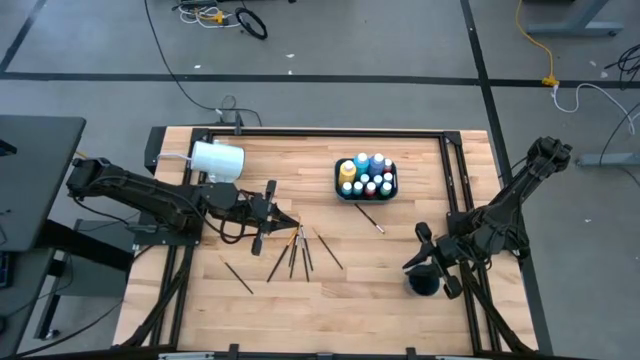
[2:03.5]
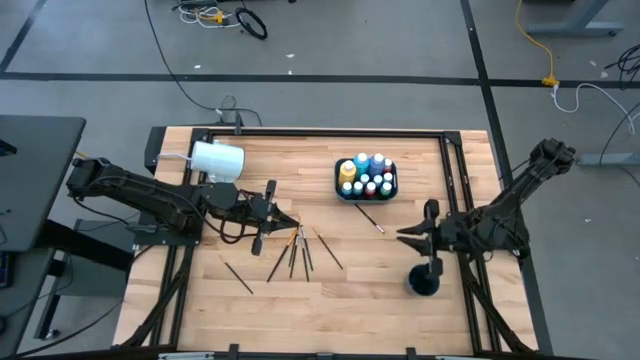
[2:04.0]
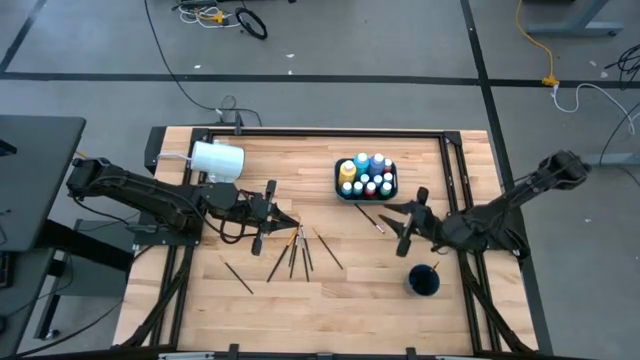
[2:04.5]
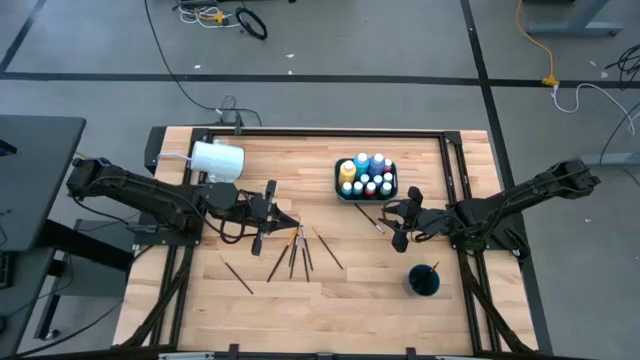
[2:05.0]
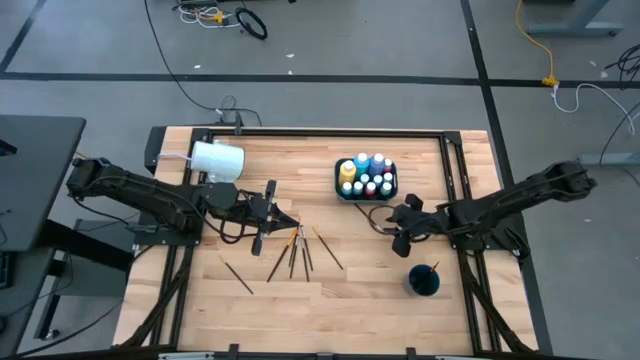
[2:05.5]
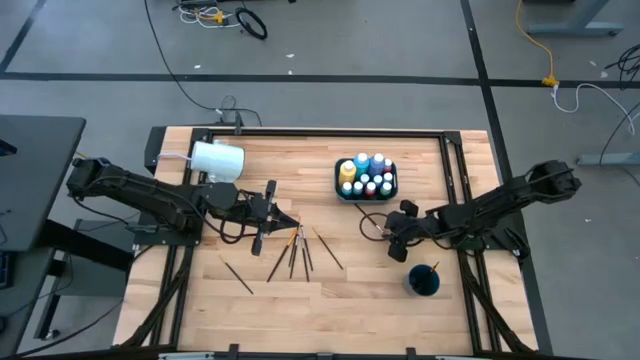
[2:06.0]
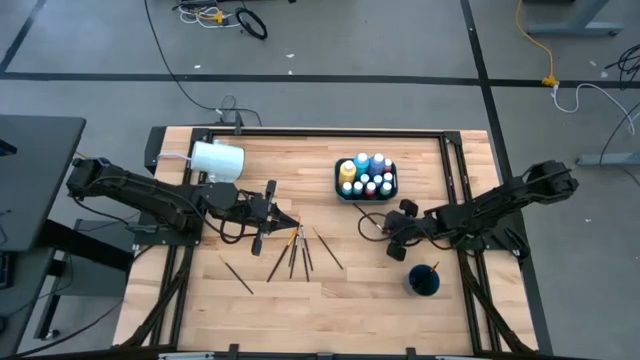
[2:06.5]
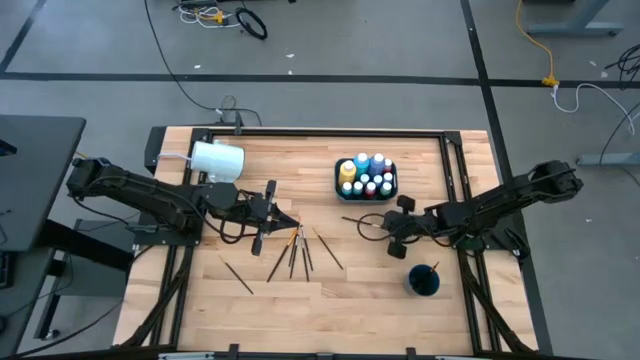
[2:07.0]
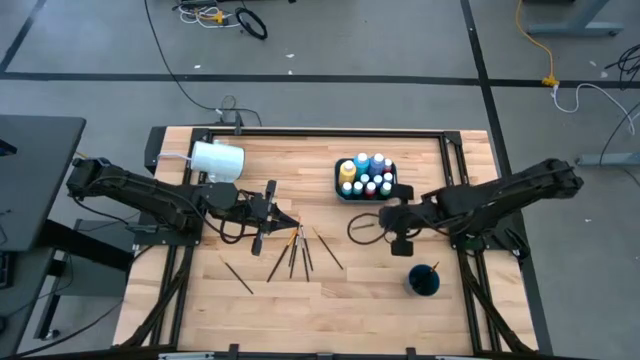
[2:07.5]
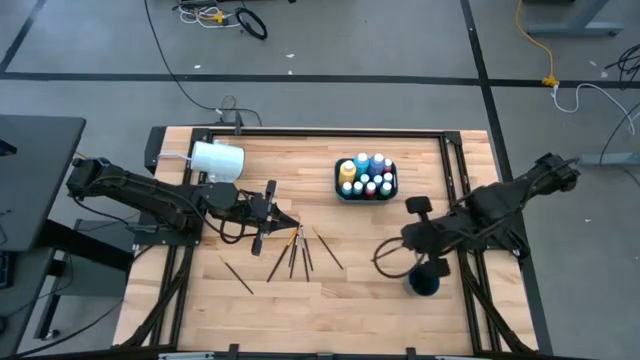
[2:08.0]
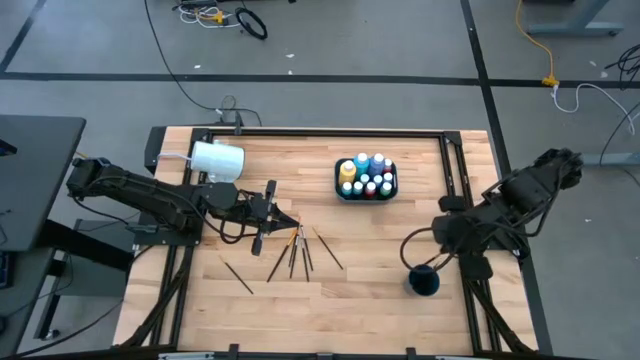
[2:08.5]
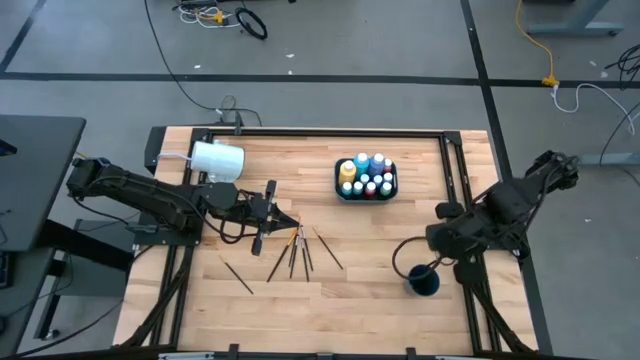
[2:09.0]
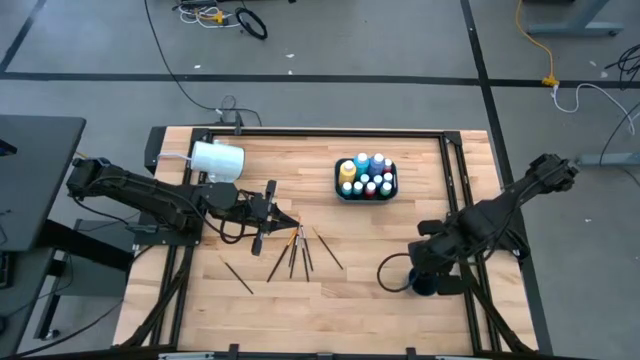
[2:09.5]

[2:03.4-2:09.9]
Task: Pick & Place Paint Supplies
Put the silver paint brush into the cup

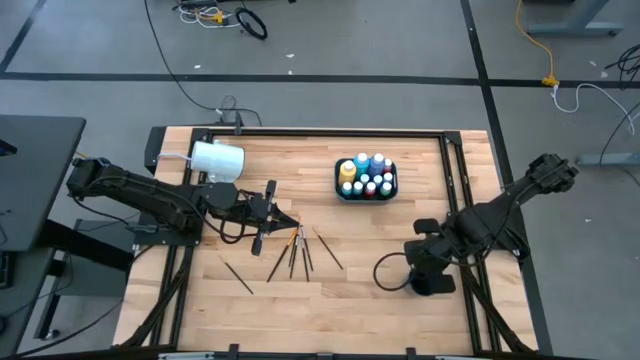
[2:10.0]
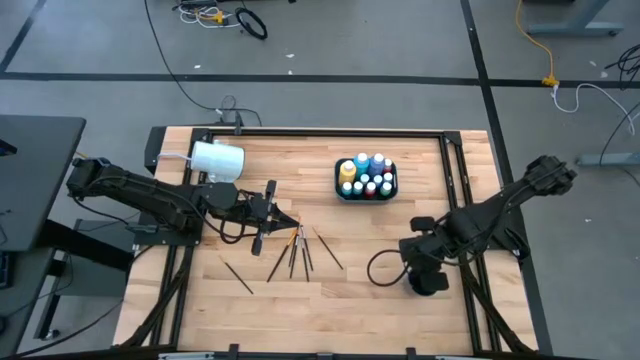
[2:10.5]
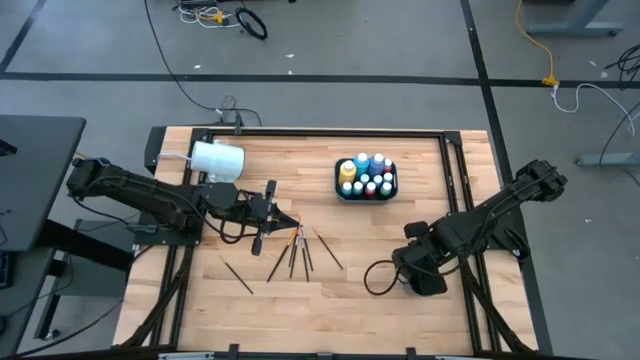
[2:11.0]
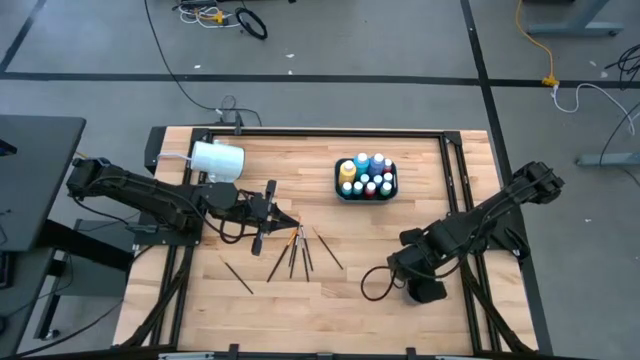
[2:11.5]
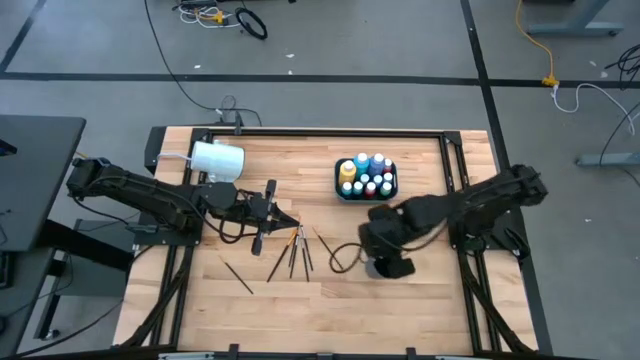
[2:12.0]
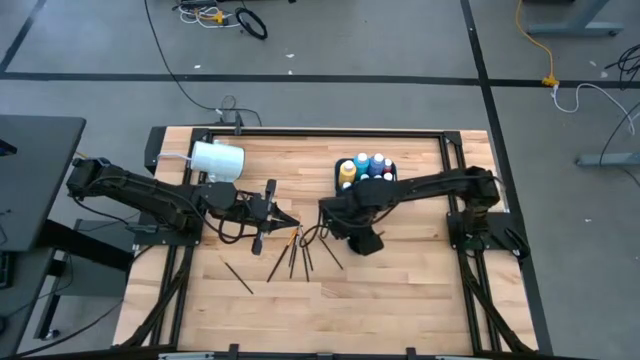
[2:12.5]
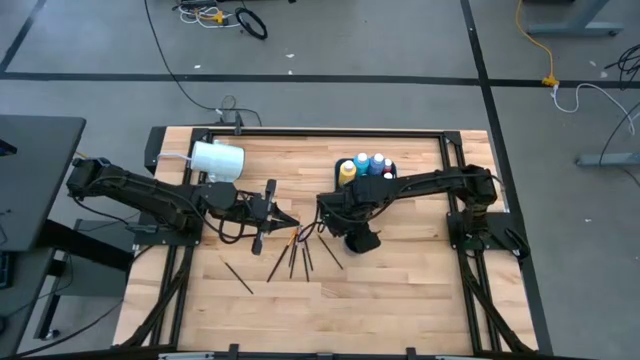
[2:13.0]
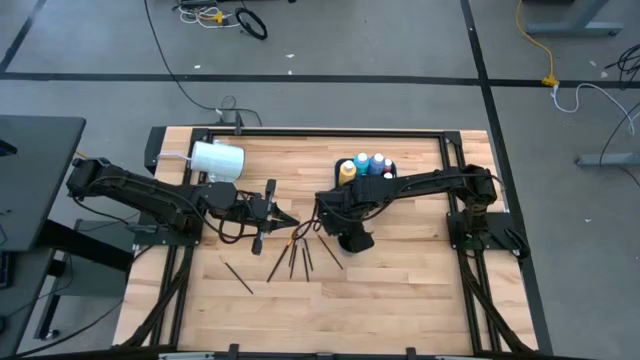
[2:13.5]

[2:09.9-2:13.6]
Move the cup to the center of the table

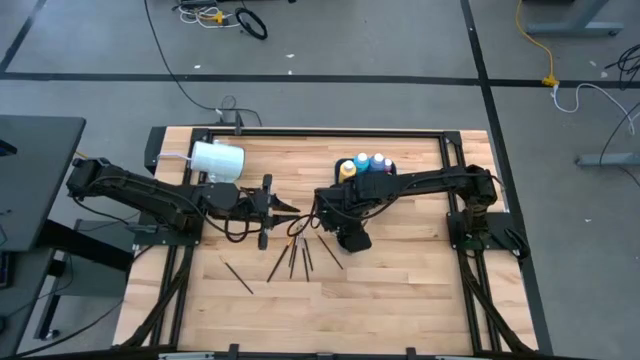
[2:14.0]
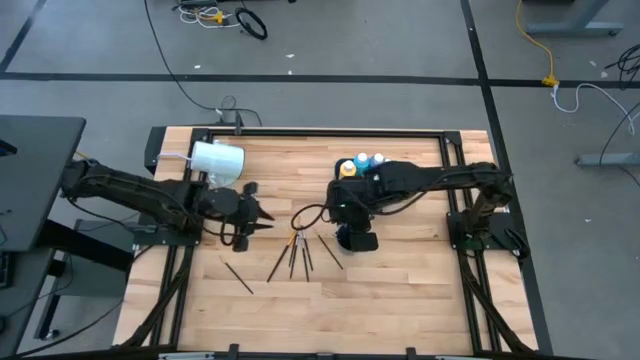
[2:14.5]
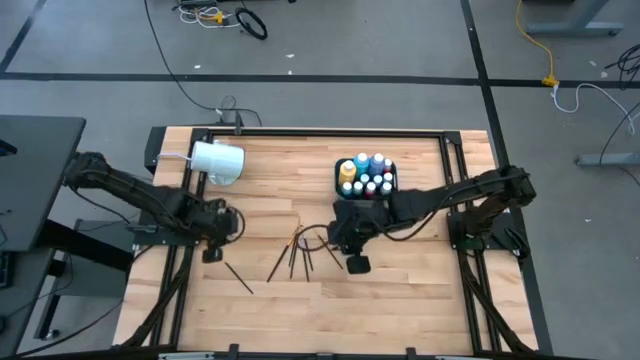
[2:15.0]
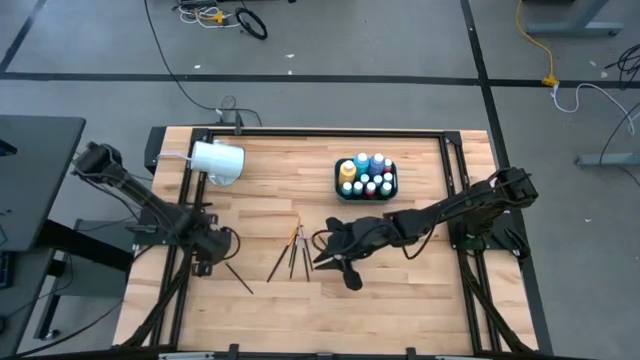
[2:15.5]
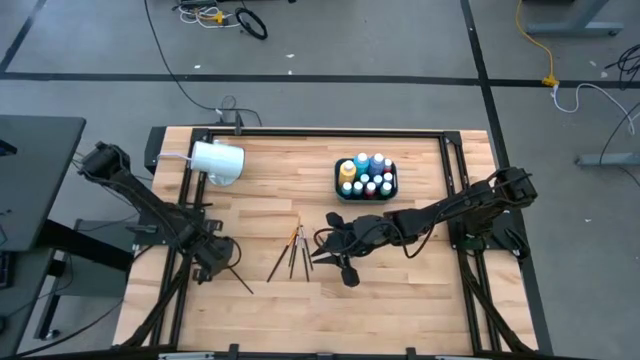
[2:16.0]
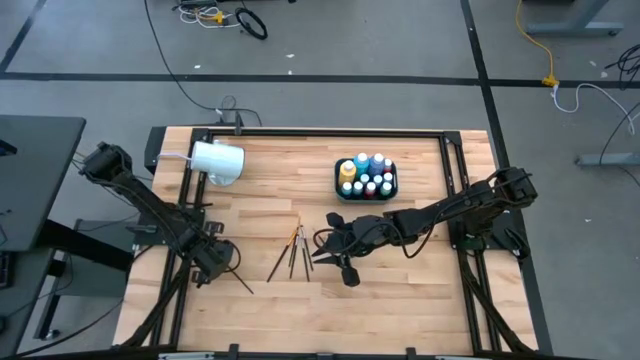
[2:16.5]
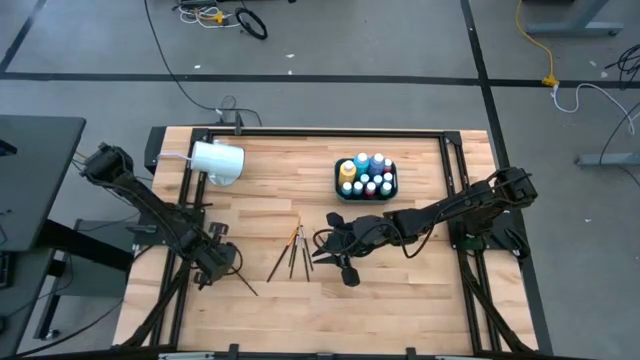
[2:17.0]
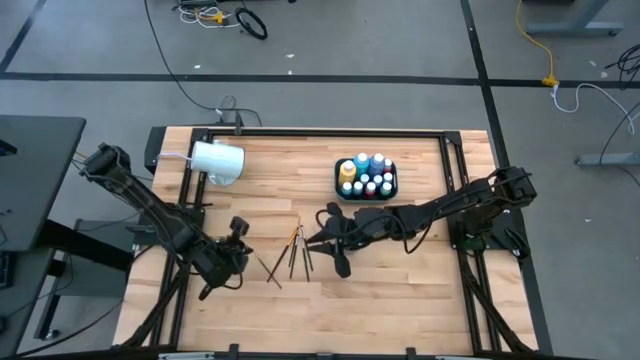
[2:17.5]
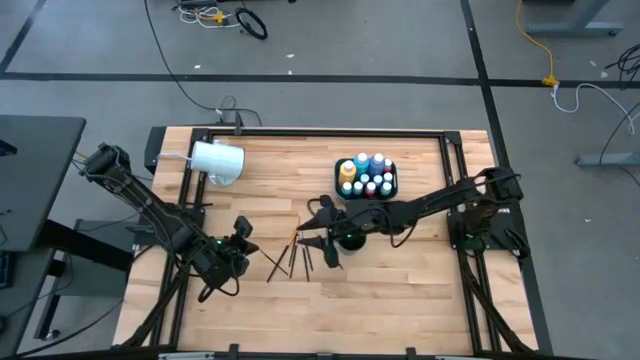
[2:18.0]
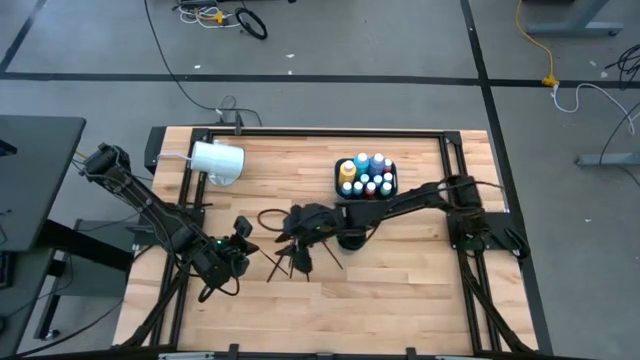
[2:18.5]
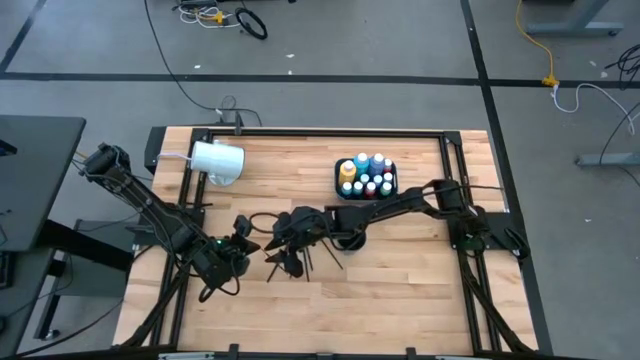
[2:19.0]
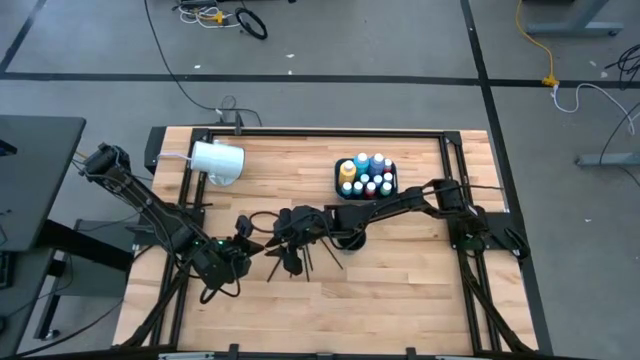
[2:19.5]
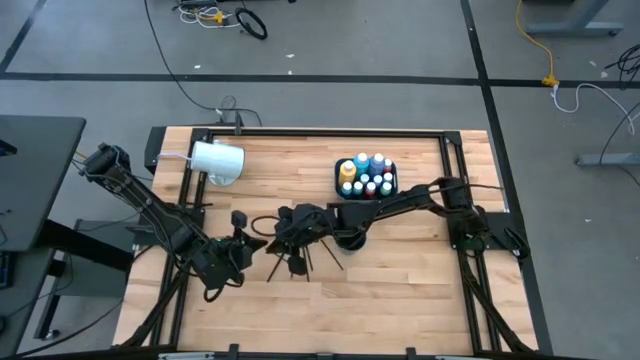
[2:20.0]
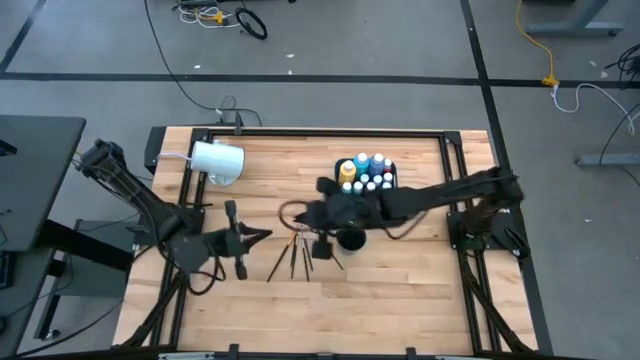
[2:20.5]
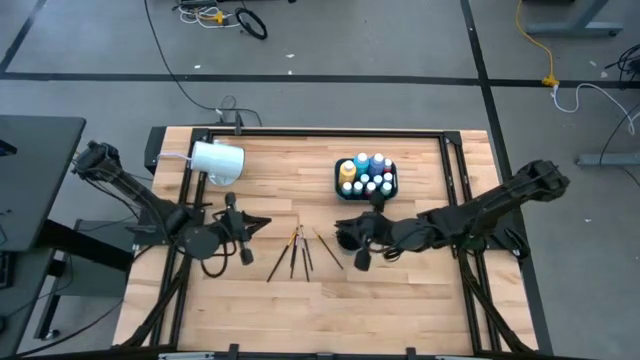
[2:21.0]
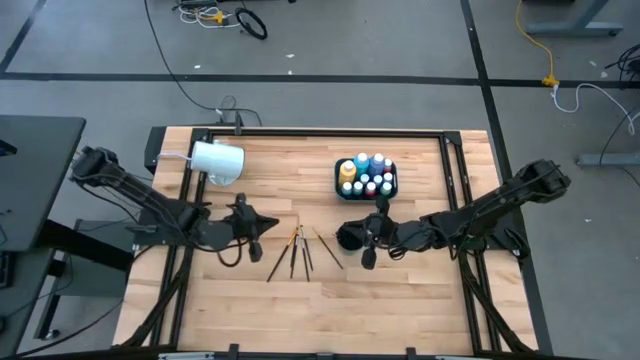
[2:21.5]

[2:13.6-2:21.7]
Put the gold paint brush into the cup

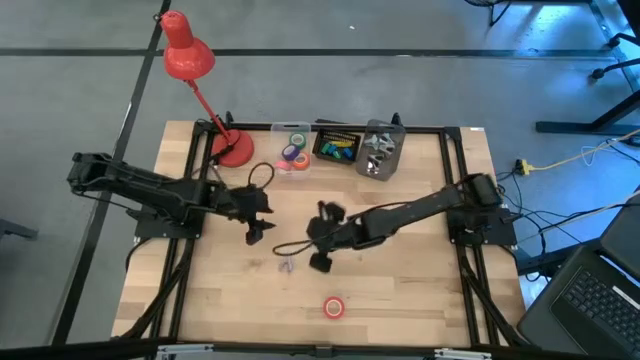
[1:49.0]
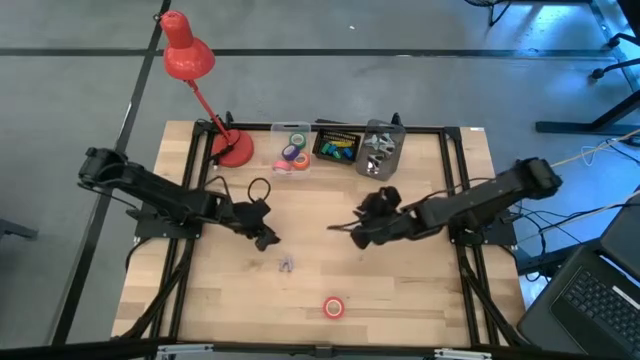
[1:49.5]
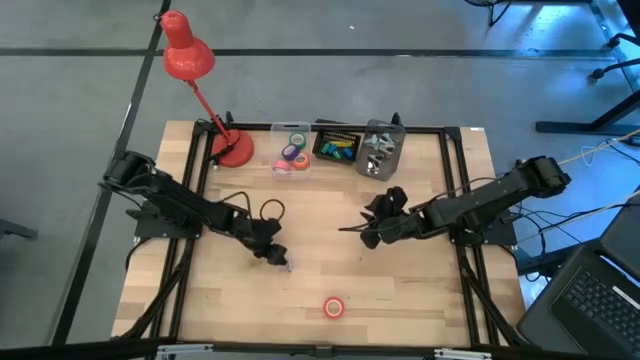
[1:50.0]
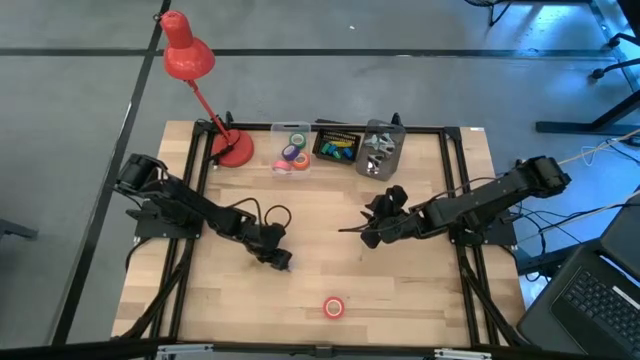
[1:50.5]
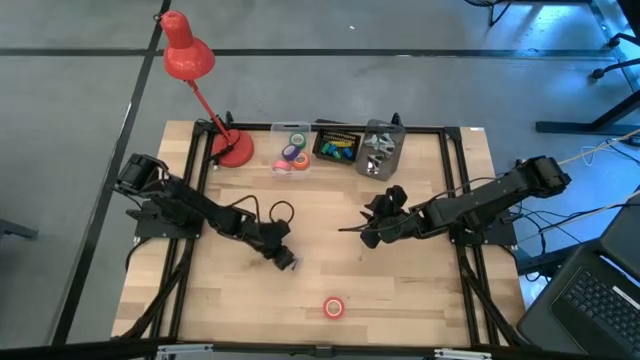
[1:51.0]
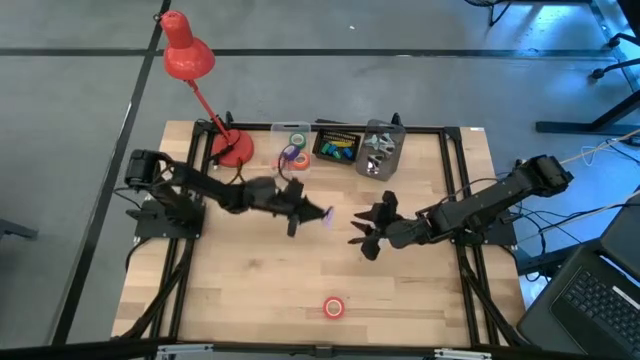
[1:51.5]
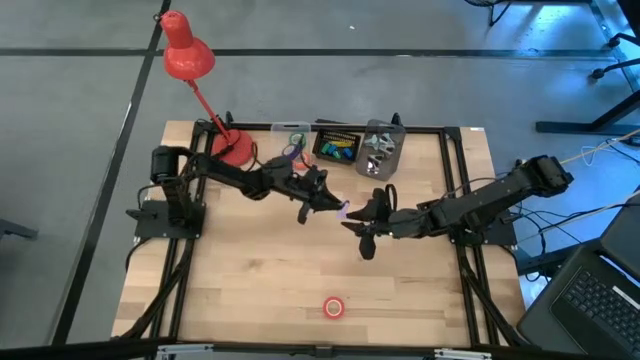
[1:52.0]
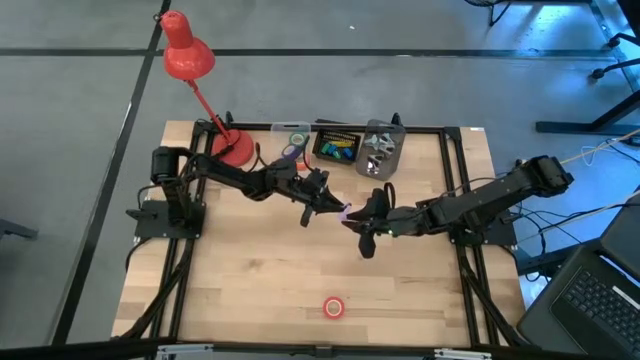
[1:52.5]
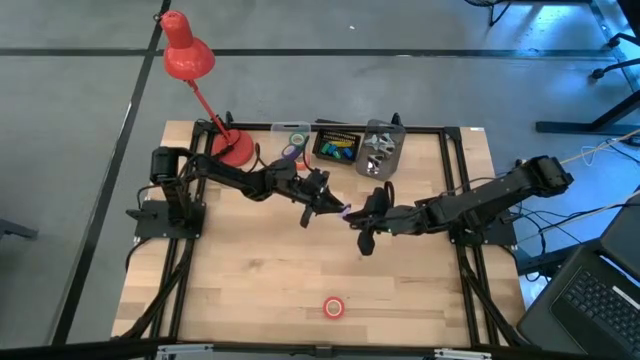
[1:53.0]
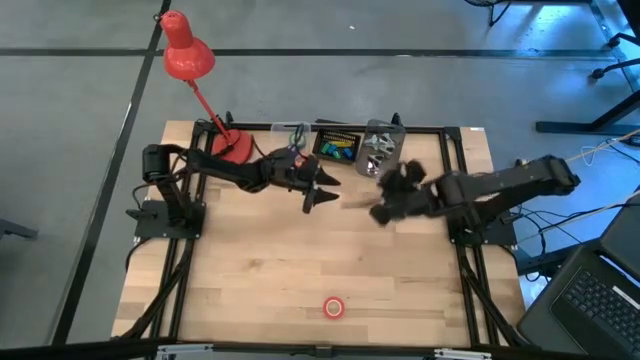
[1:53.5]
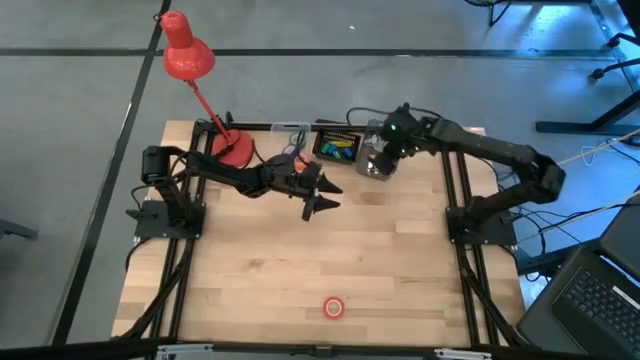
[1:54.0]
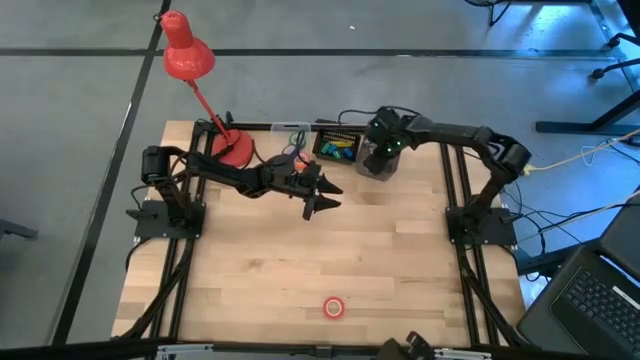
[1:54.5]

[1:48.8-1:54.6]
Task: Pick and place Stapler, Stapler remover, tape
Put the purple staple remover into the right black bin
